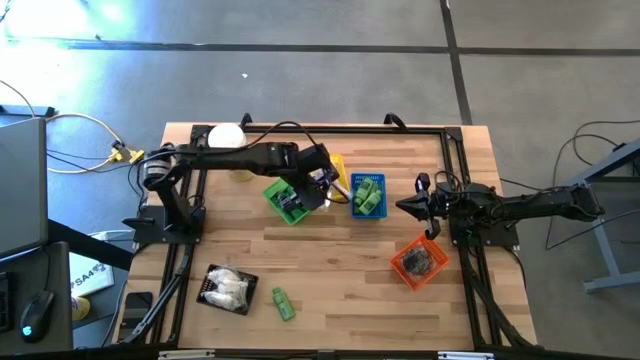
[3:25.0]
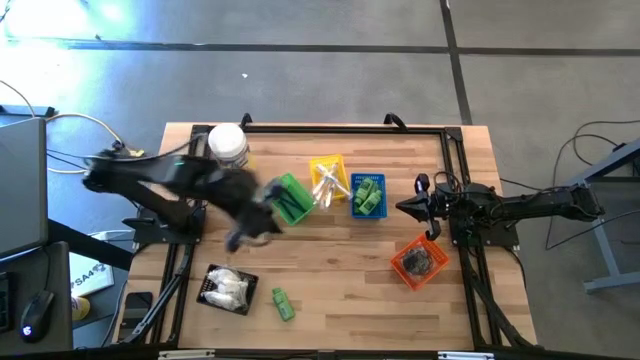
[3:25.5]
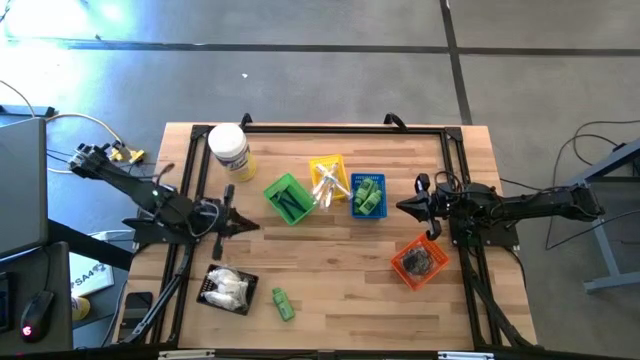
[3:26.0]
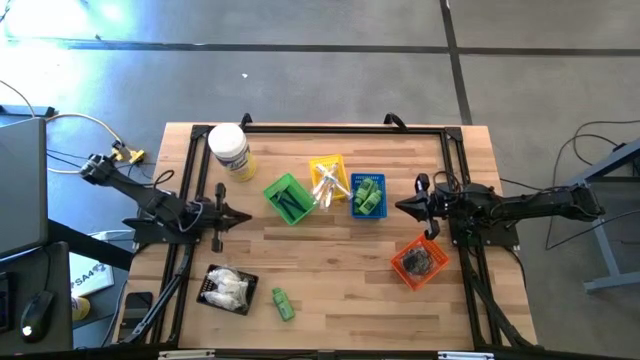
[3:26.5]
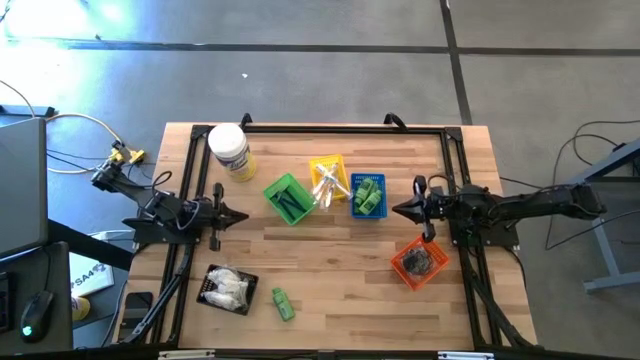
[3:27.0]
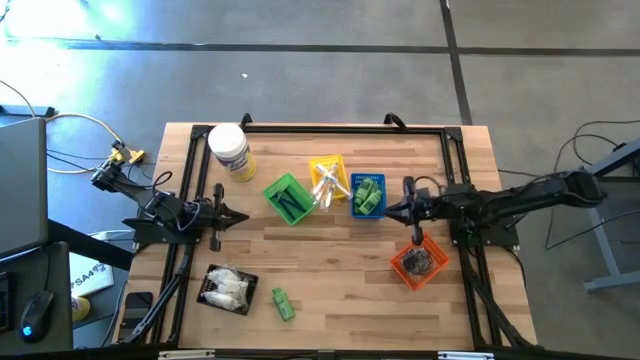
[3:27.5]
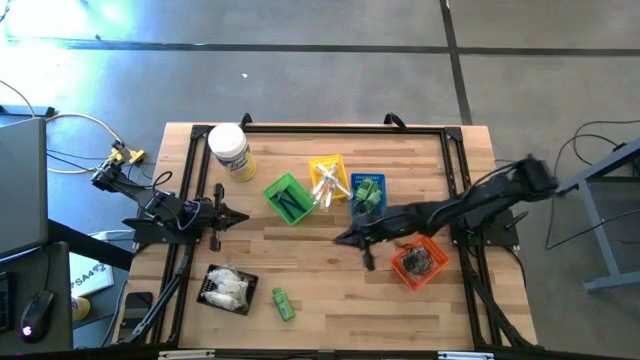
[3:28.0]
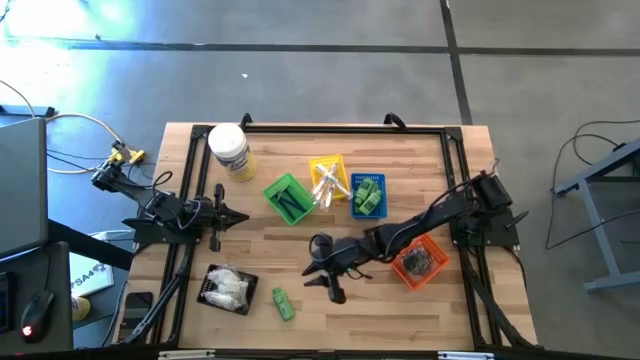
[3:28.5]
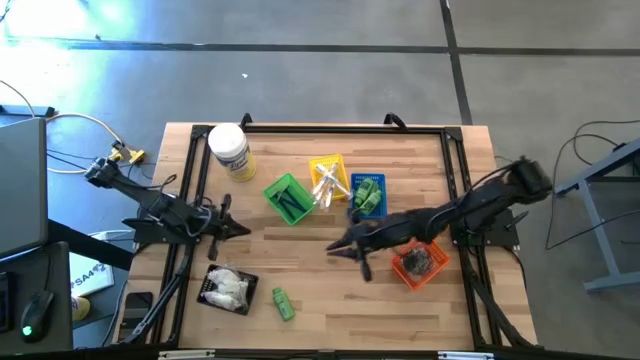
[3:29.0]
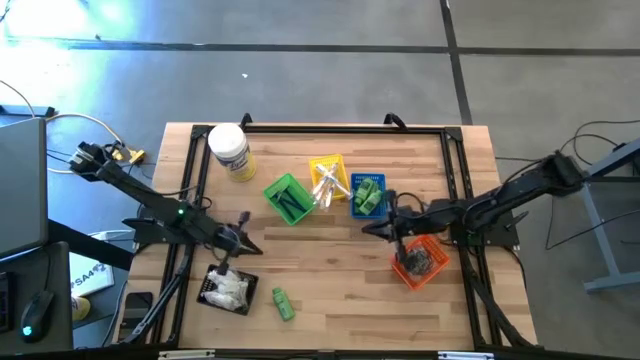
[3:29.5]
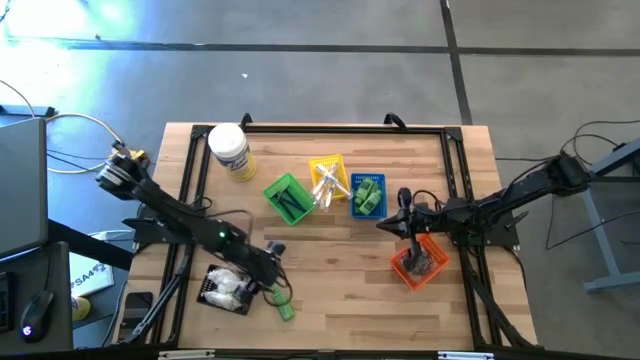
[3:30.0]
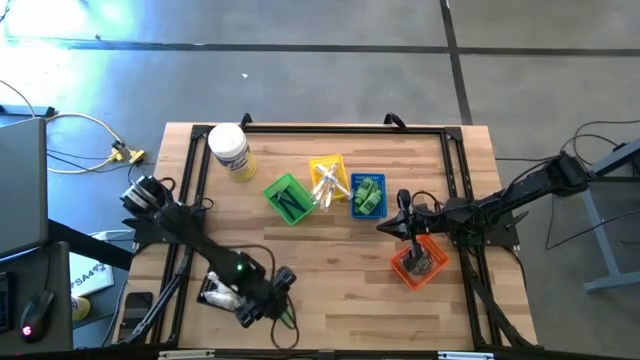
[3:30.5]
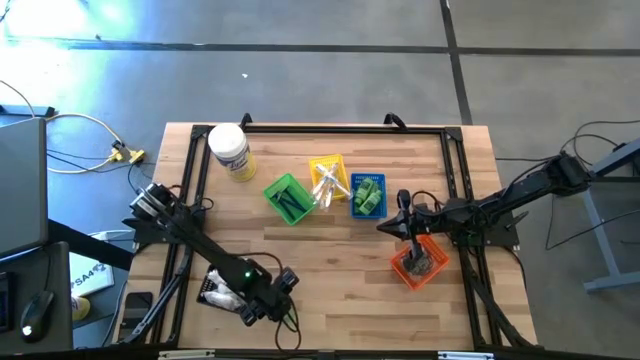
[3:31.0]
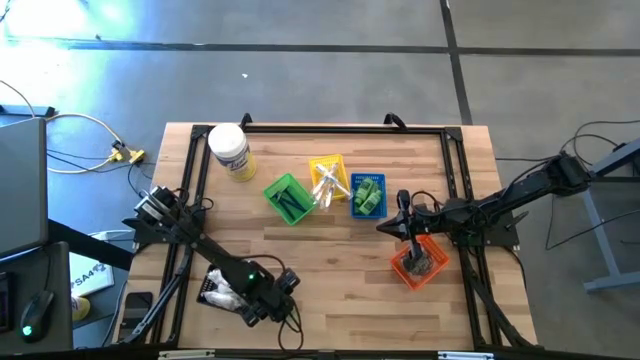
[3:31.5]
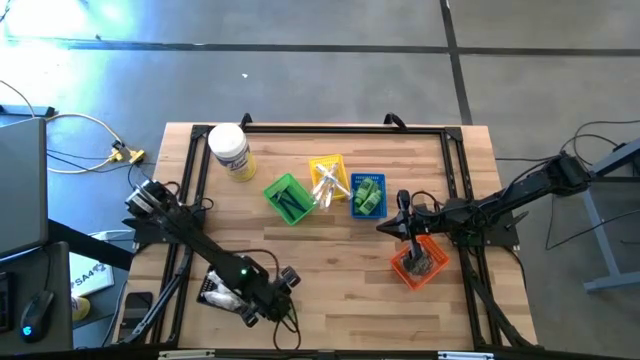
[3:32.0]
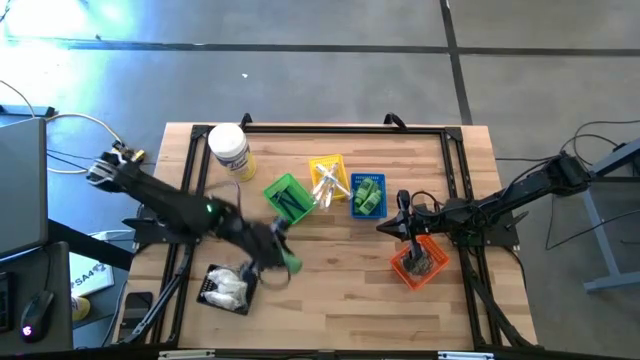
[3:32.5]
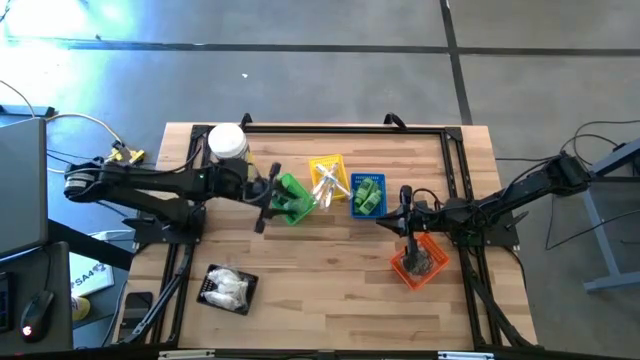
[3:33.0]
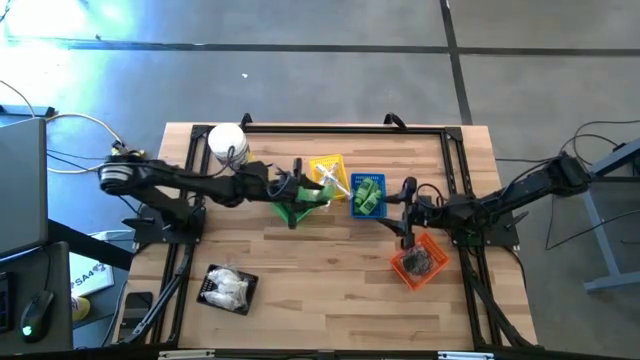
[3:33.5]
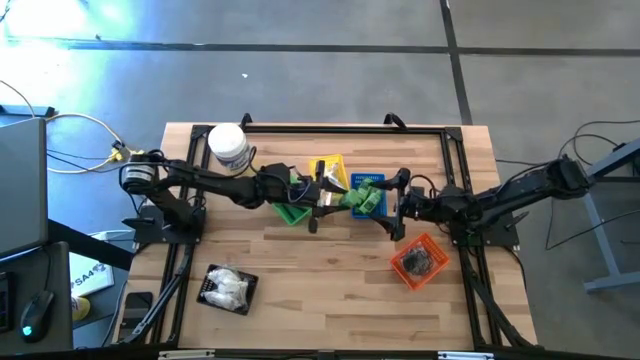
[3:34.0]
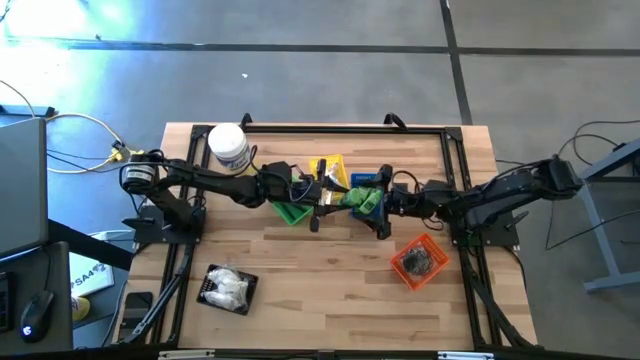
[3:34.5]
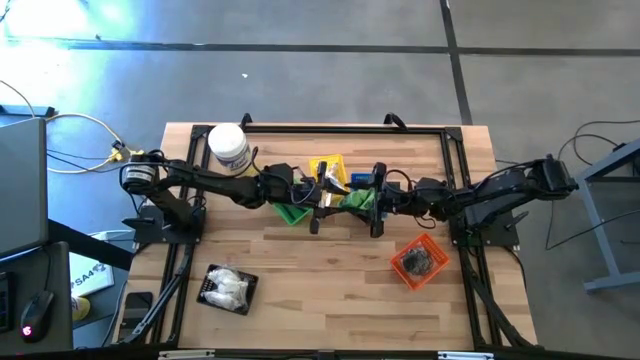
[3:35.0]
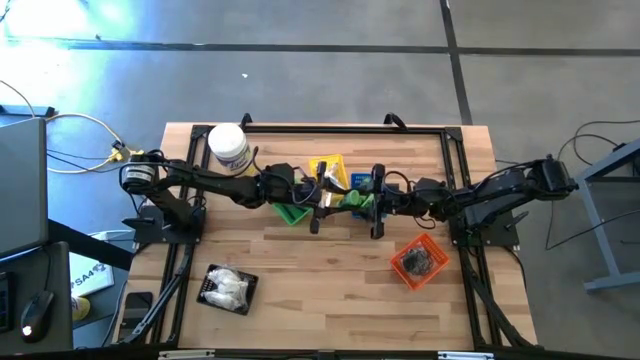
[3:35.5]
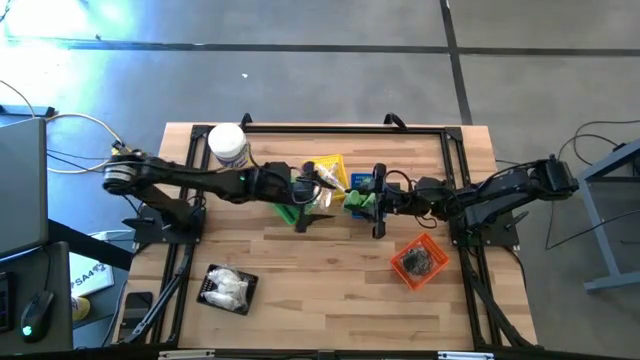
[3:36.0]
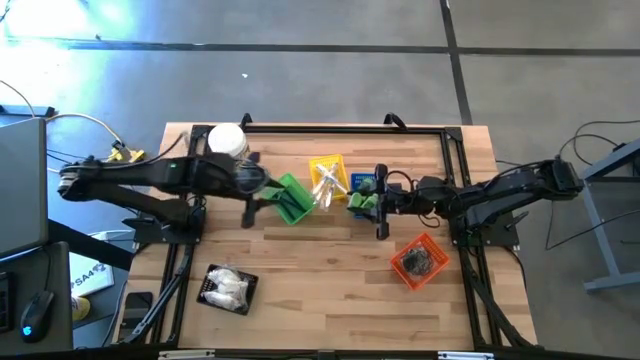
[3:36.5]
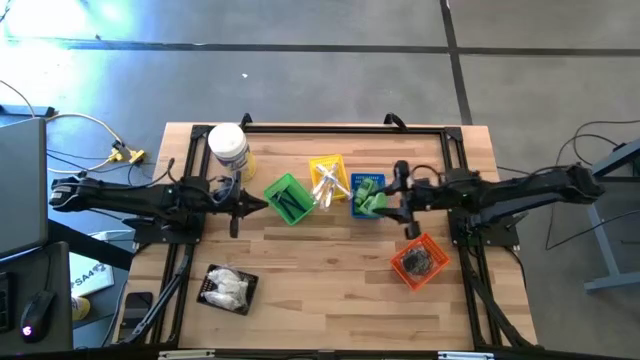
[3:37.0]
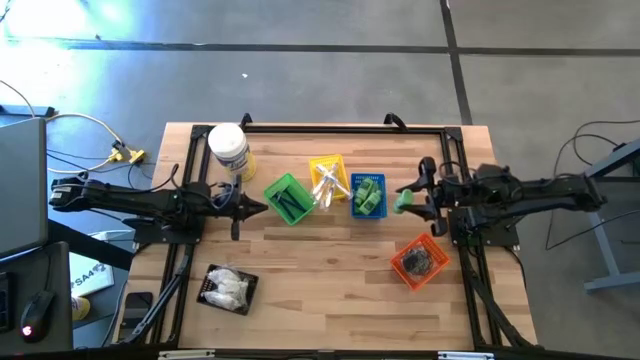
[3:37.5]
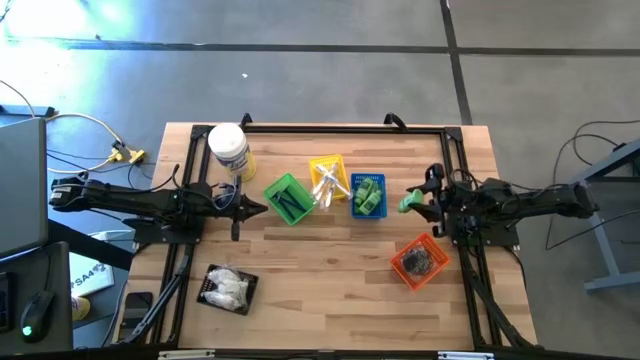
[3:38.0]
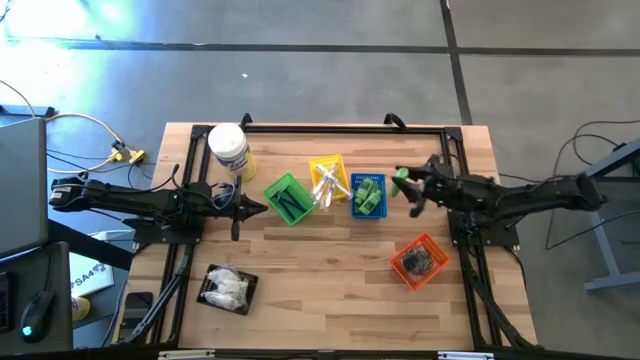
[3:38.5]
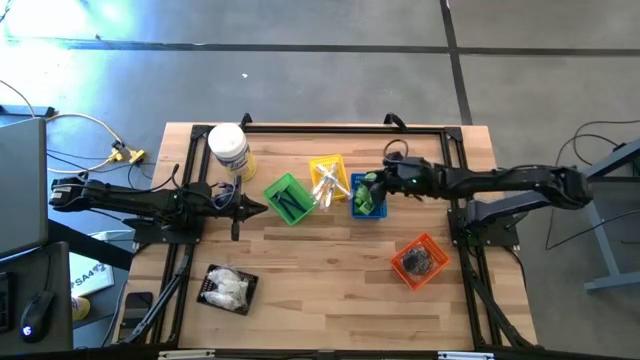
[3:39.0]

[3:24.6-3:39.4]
Task: Pick & Place Travel size toiletries
Put the green shampoo into the blue basket

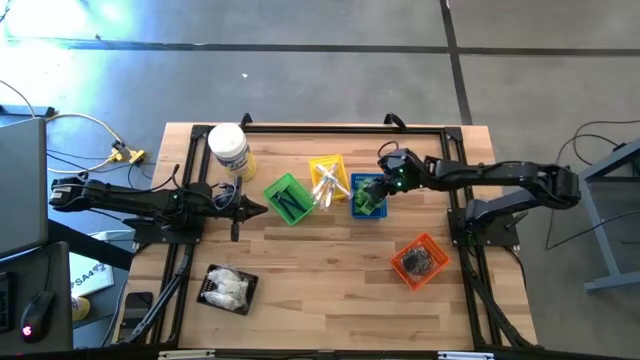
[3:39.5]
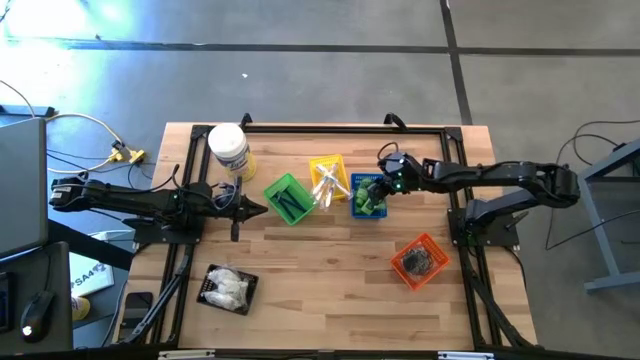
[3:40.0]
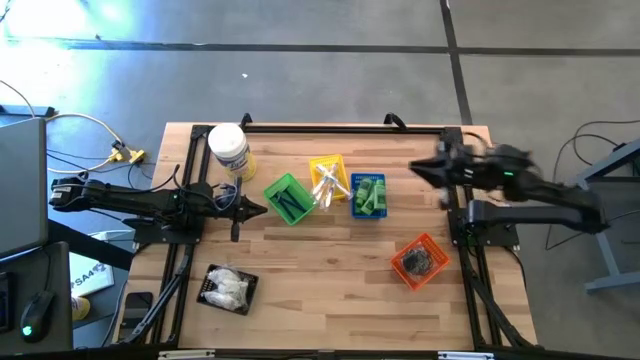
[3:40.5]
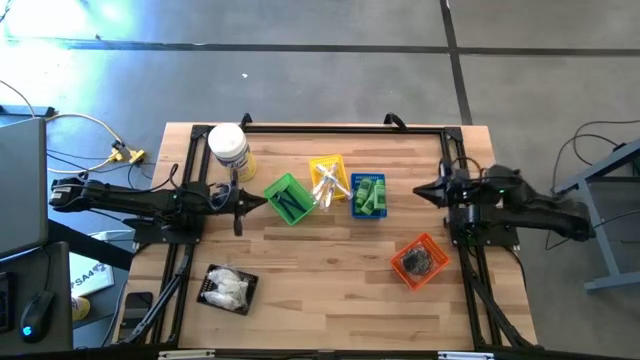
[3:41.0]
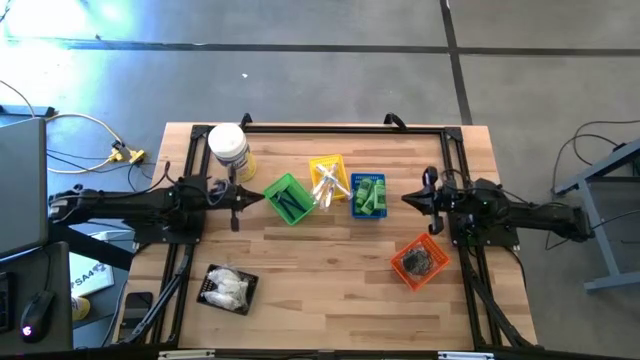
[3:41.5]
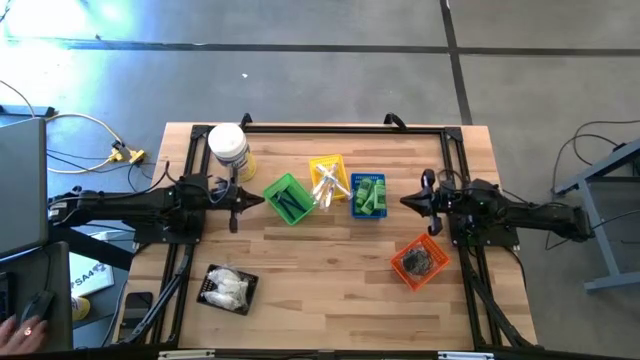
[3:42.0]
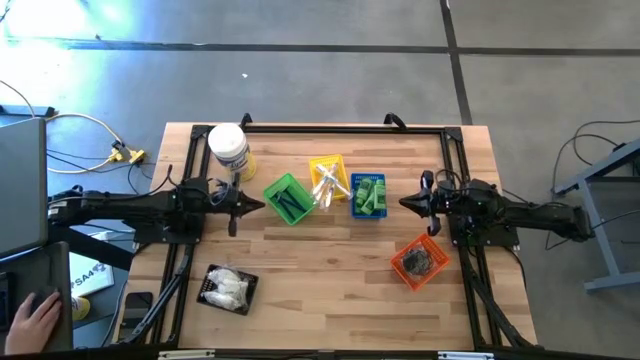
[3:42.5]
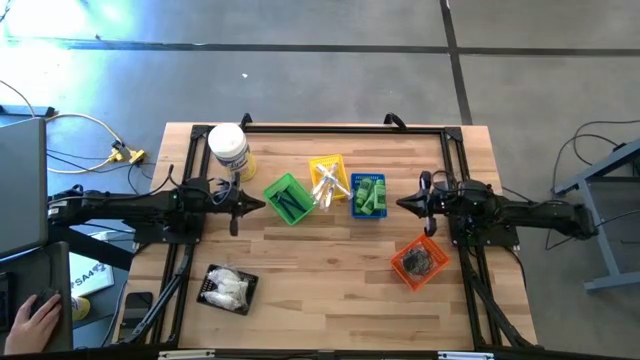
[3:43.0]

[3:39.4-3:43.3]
Return to Home Position

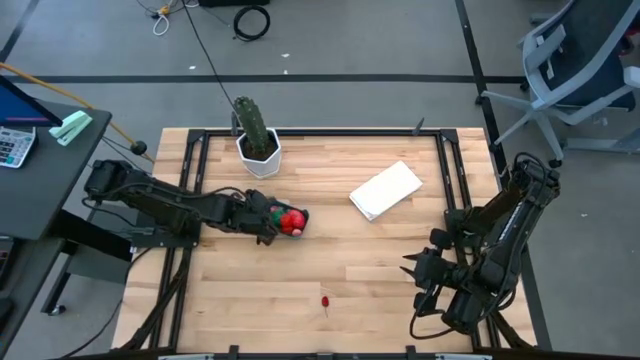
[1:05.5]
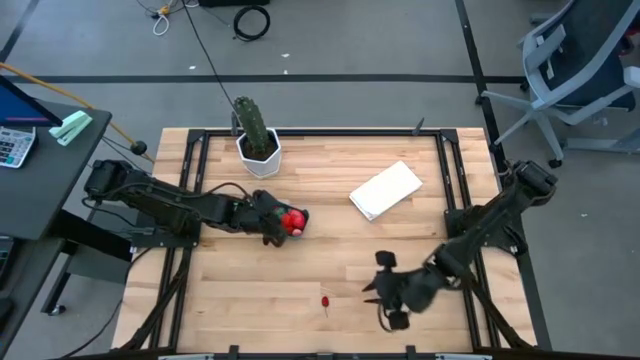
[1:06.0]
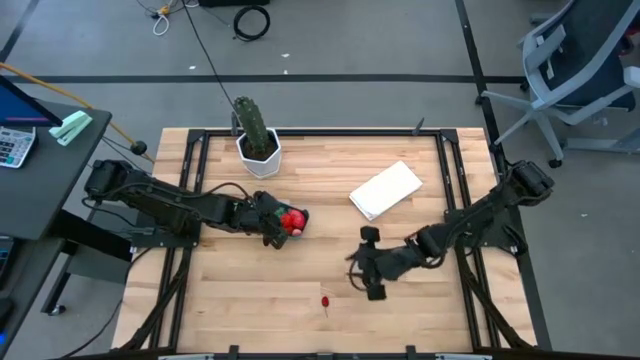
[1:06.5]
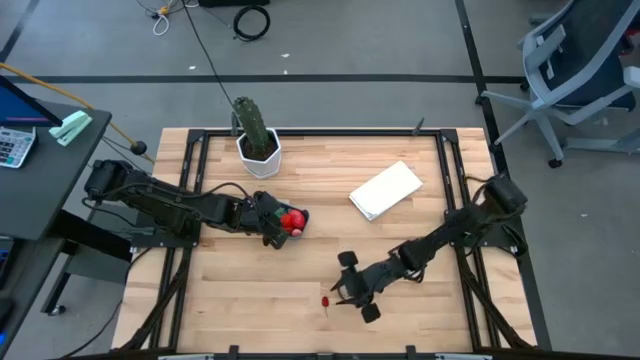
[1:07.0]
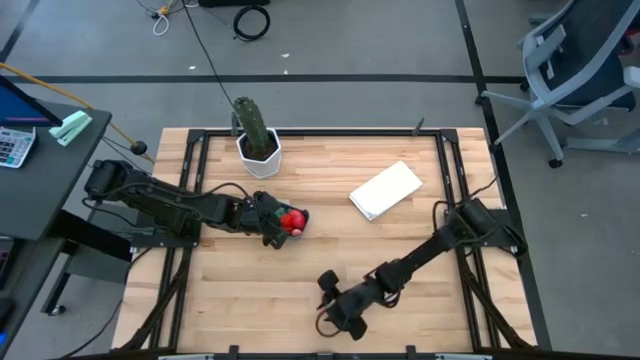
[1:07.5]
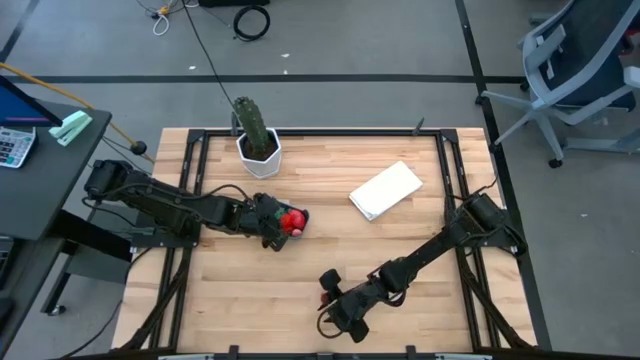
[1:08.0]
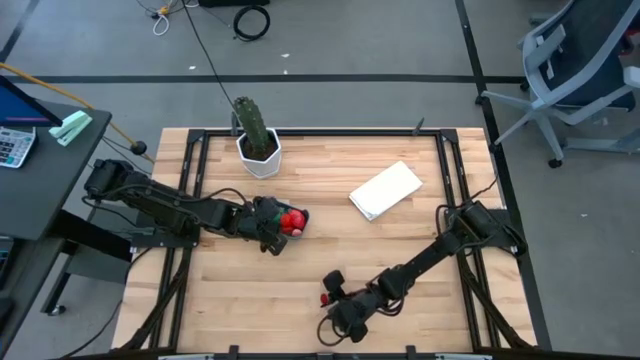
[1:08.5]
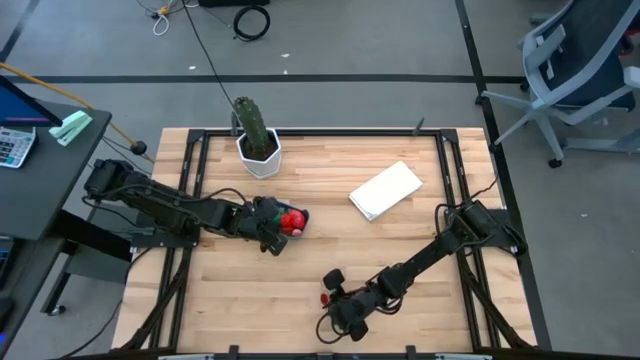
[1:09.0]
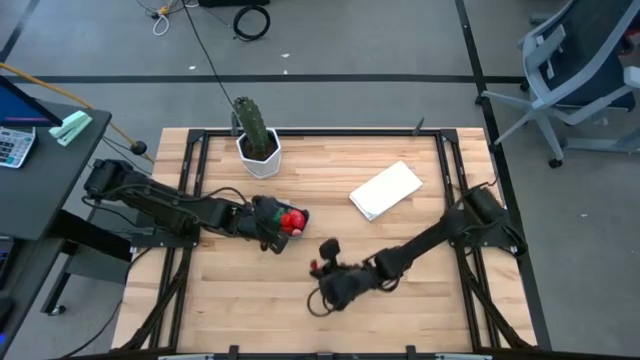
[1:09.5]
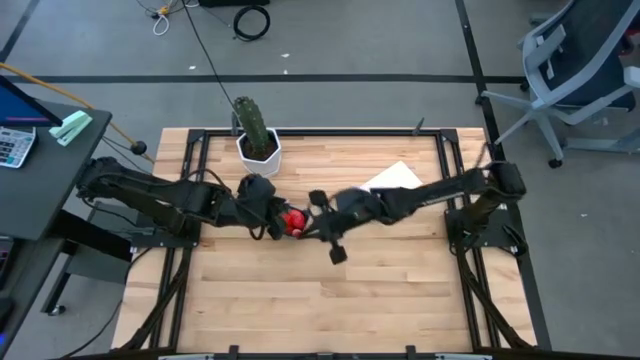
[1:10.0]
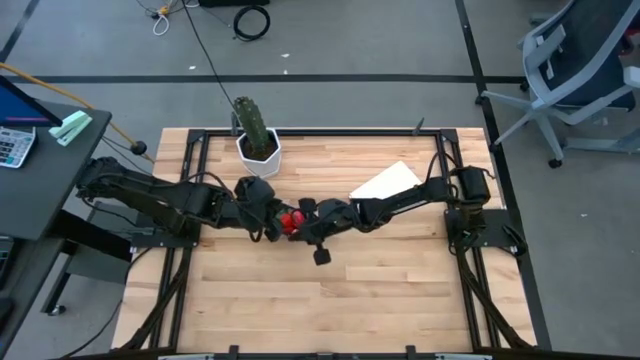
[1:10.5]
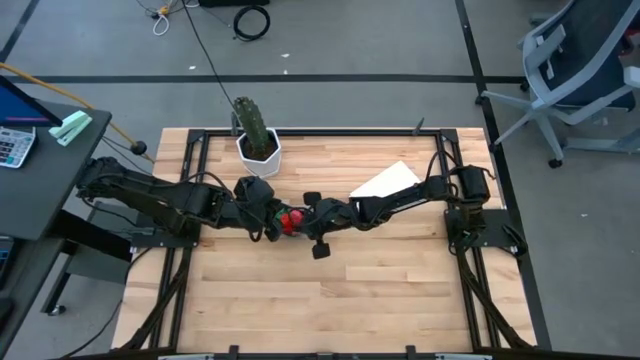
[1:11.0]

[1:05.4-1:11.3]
Task: Pick and placing Produce into tupperware
Put the red cherry into the blue bin
